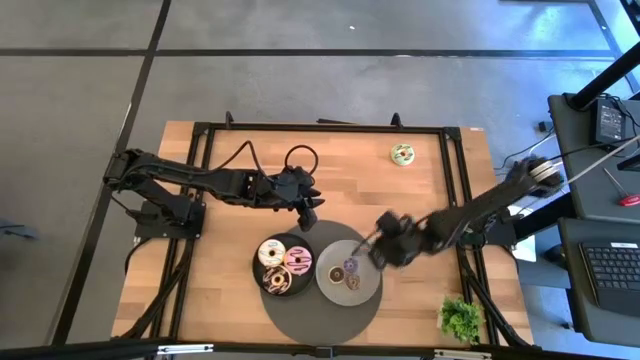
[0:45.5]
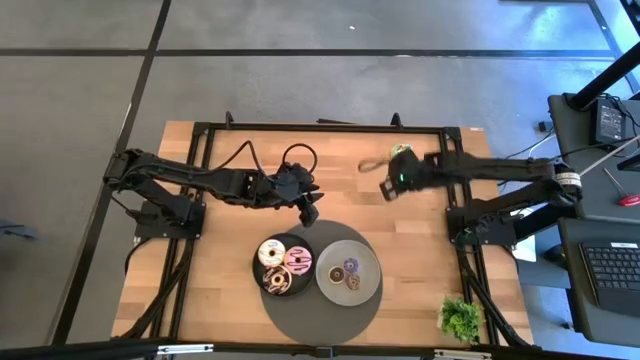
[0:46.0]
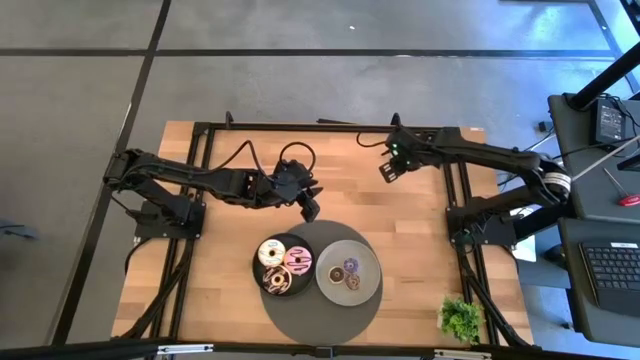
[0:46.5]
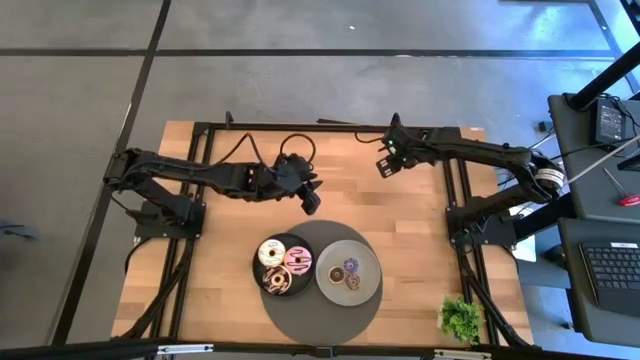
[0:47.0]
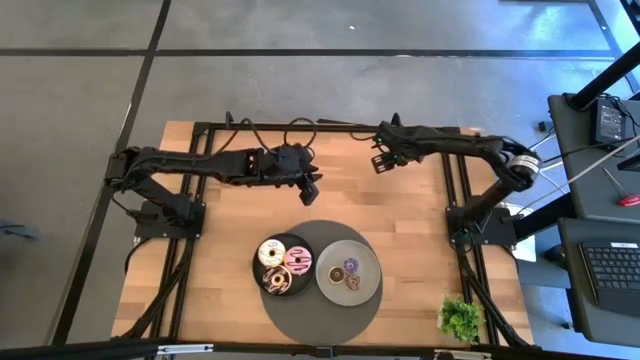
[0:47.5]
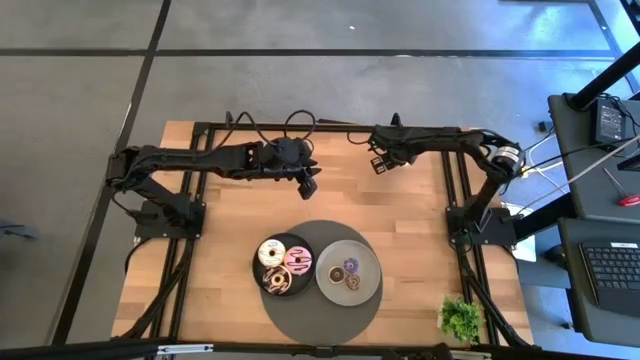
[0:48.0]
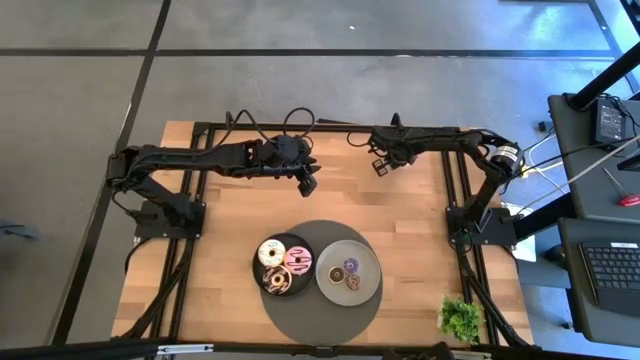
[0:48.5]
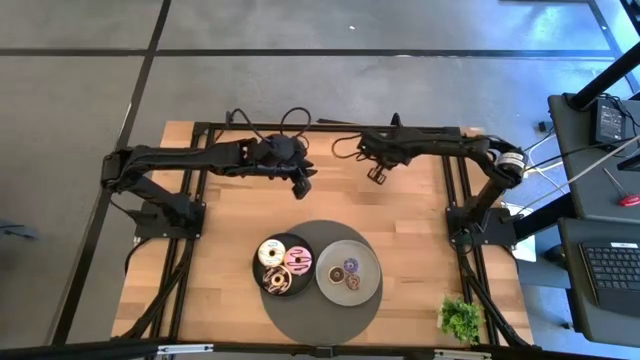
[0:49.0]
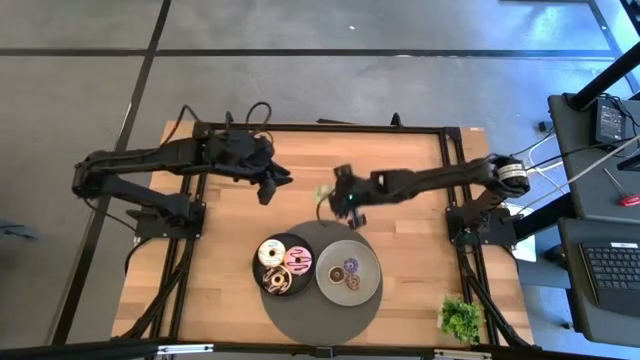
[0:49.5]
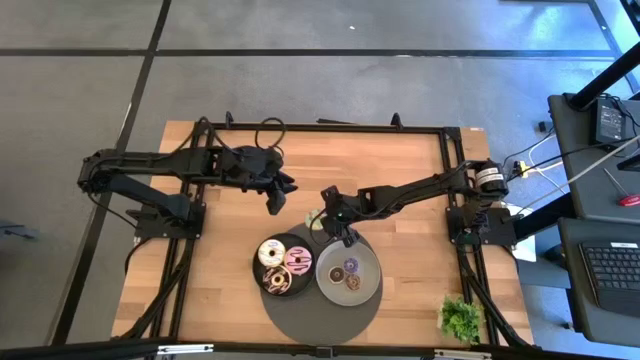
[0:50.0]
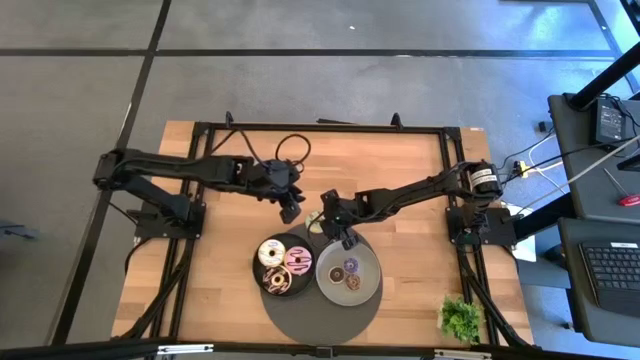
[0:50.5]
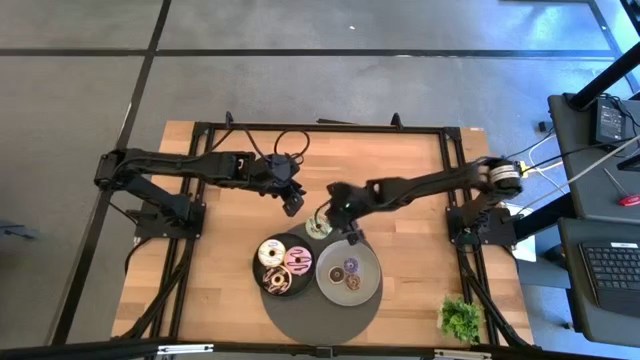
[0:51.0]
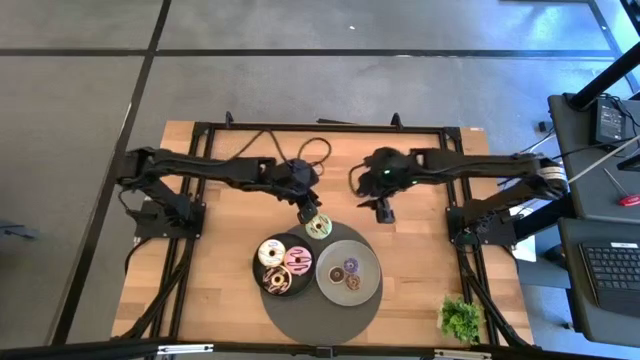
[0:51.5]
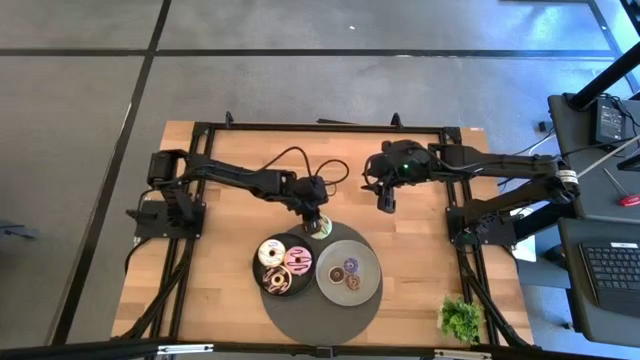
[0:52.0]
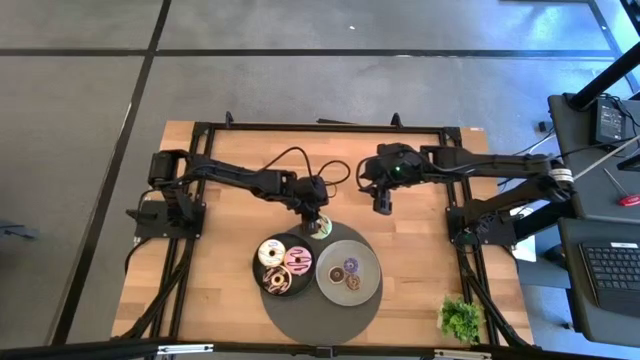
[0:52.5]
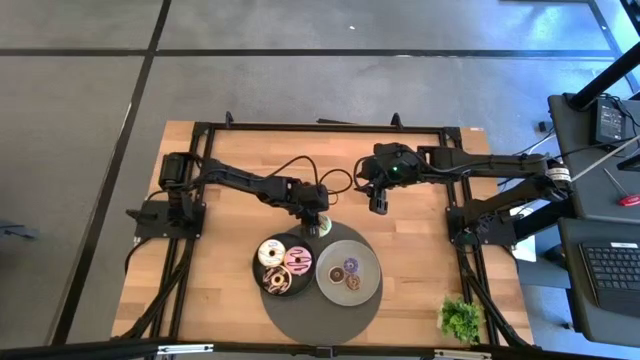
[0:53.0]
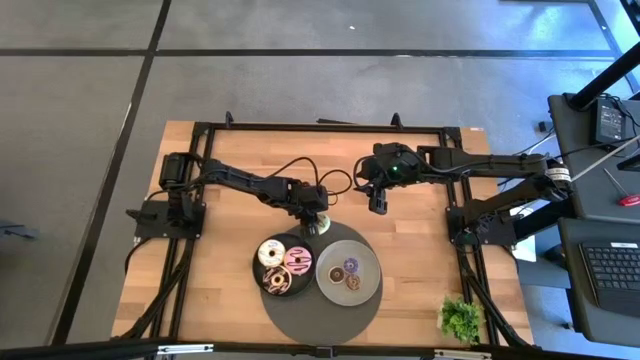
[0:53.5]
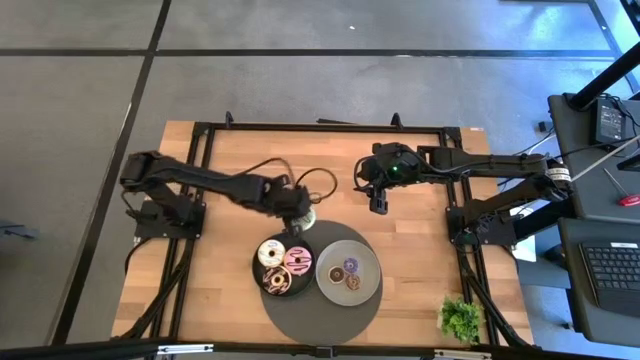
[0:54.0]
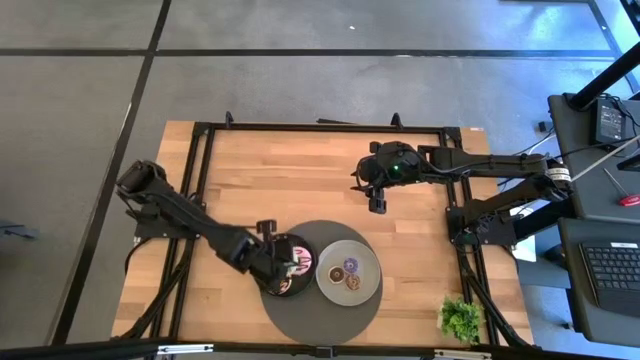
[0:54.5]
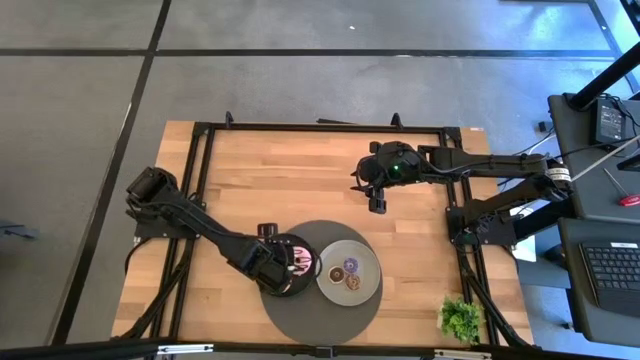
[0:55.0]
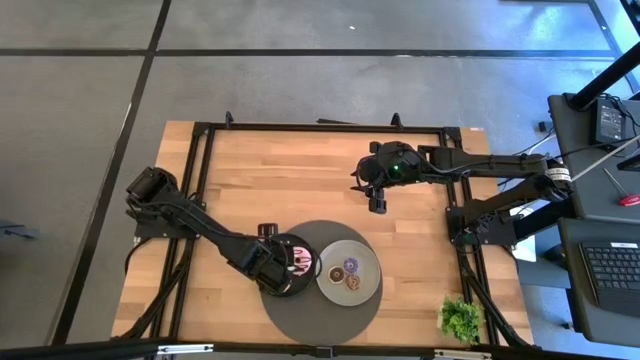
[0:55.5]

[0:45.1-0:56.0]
Task: Pick & Place donuts
Put the big light green donut on the black plate

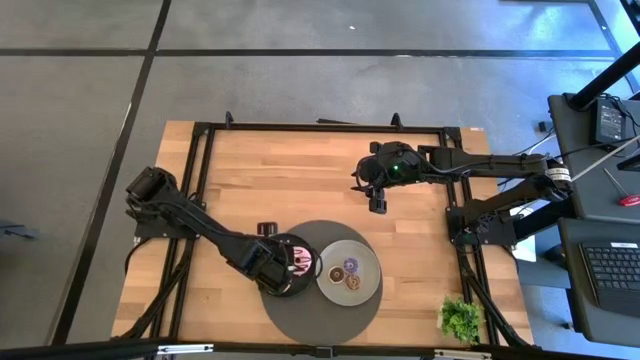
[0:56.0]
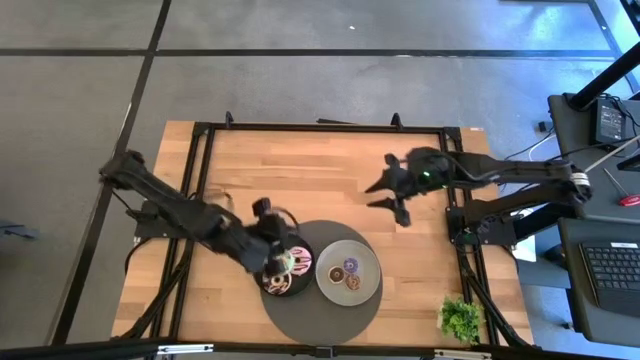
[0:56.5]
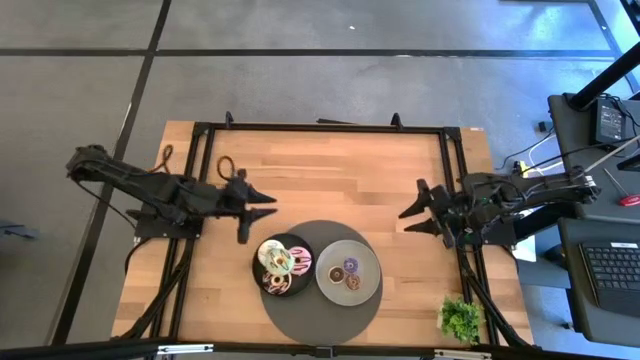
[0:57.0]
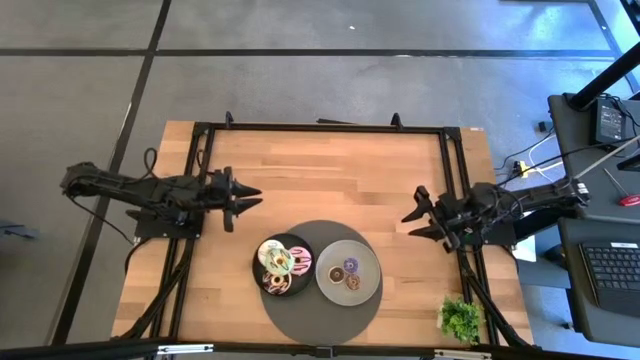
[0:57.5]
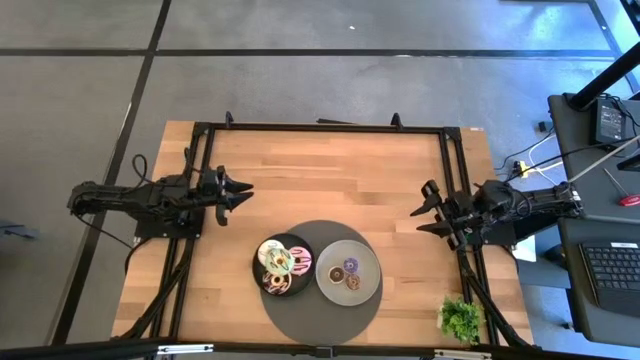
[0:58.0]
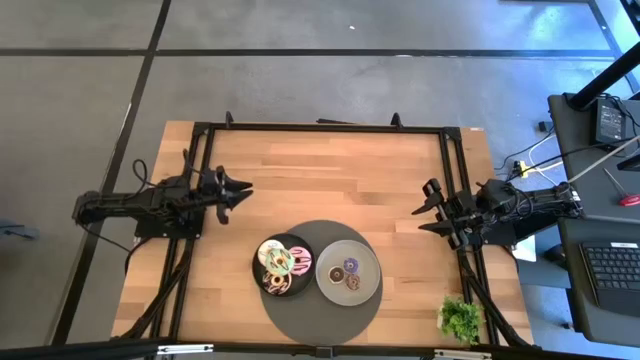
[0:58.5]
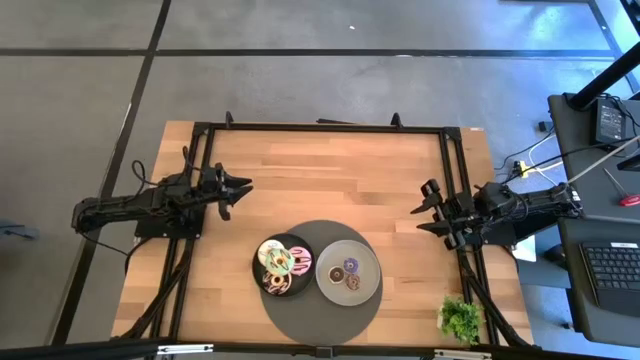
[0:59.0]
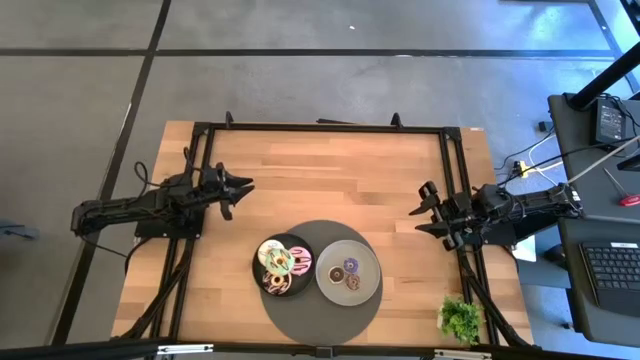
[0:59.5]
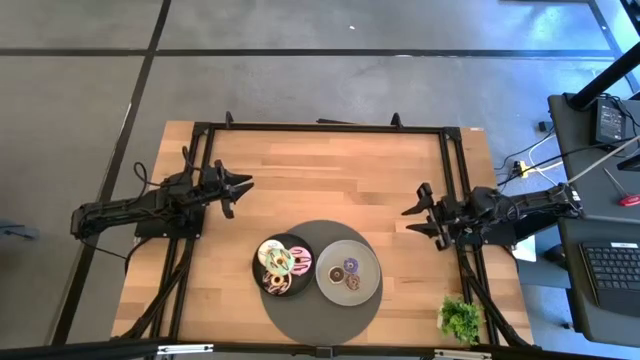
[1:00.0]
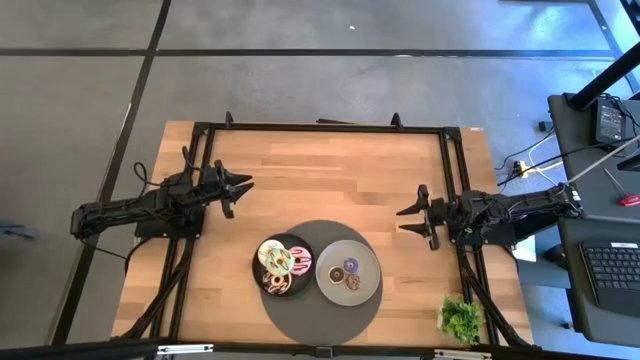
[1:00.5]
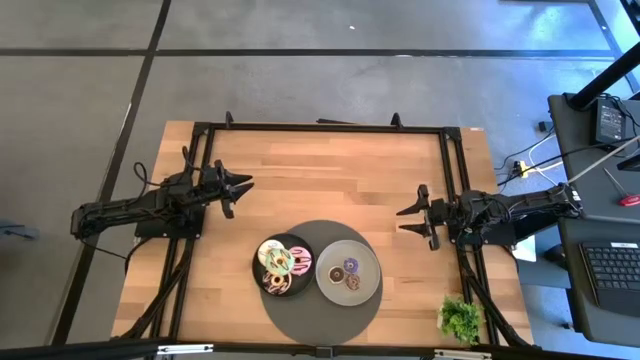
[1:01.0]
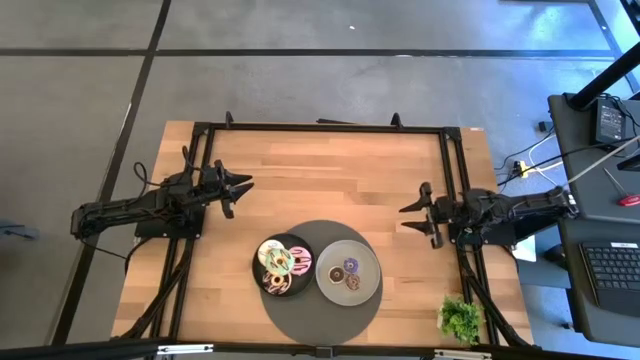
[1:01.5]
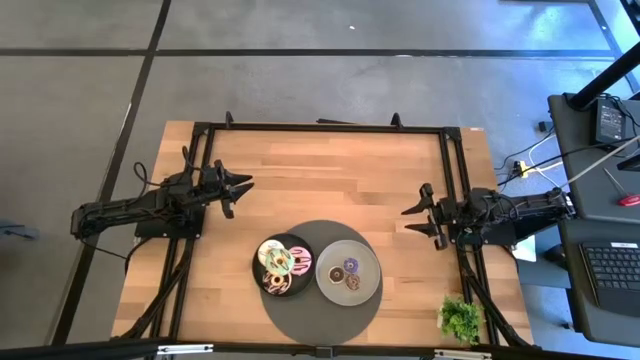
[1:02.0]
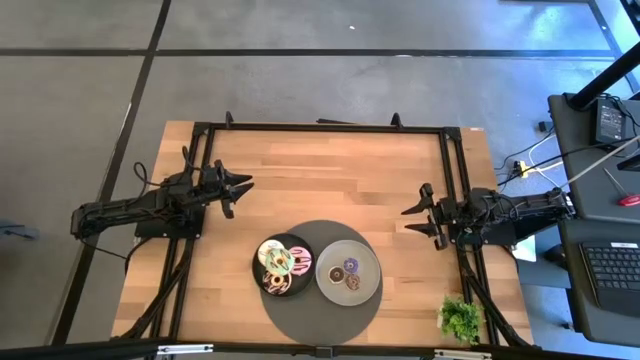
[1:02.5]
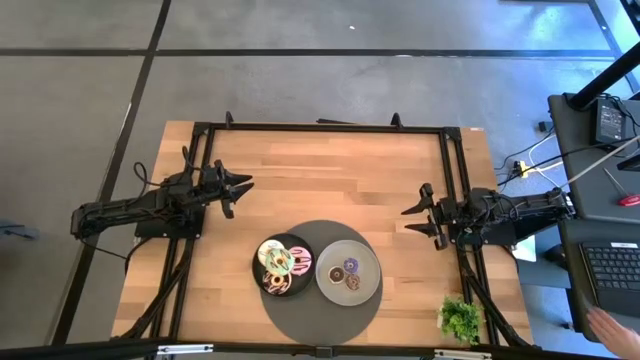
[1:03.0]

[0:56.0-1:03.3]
Return to Home Position

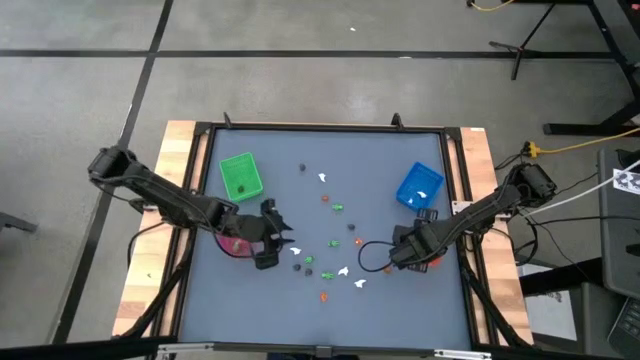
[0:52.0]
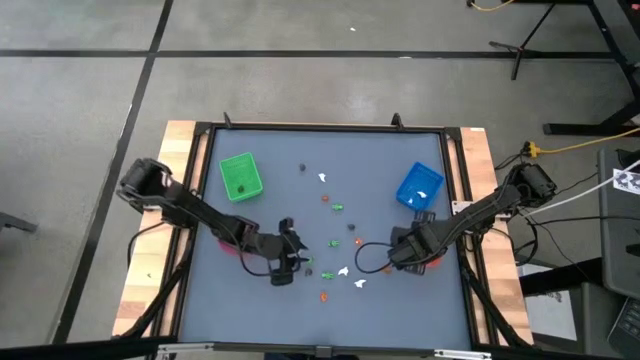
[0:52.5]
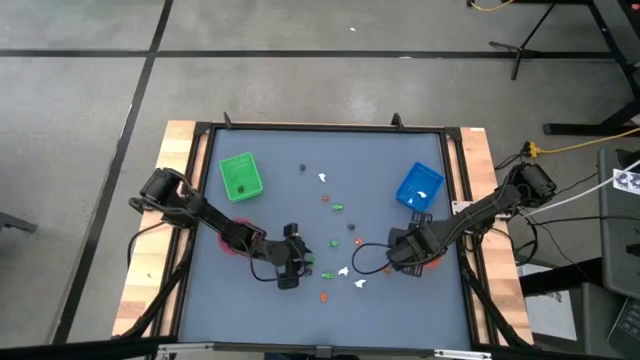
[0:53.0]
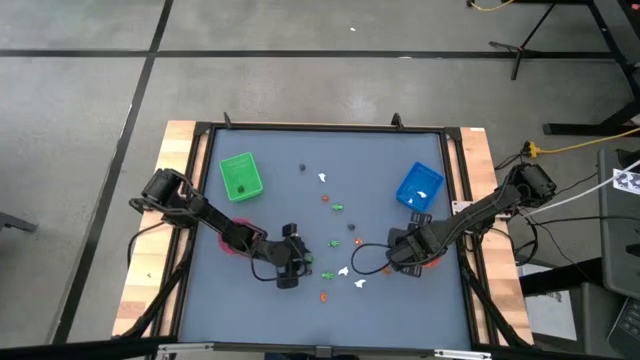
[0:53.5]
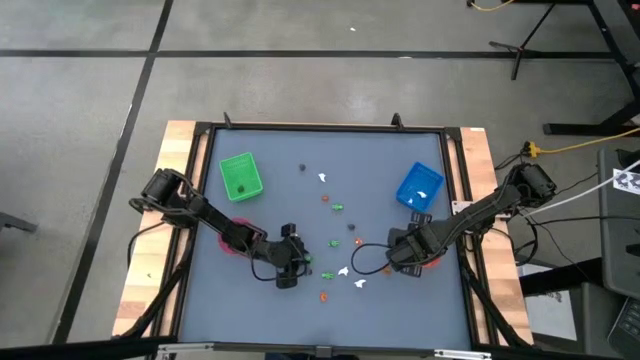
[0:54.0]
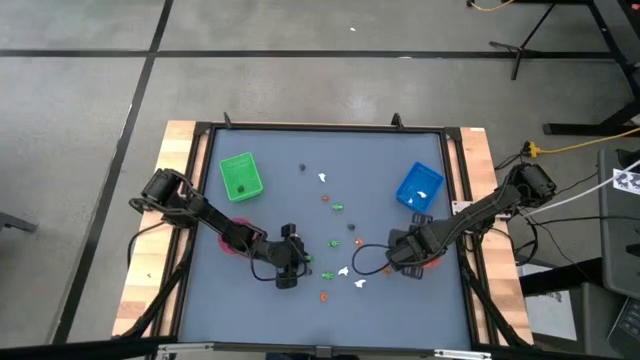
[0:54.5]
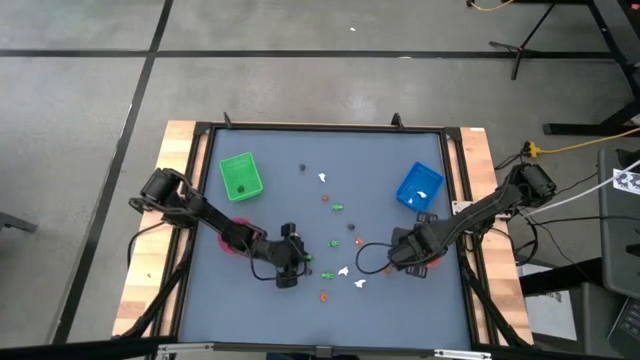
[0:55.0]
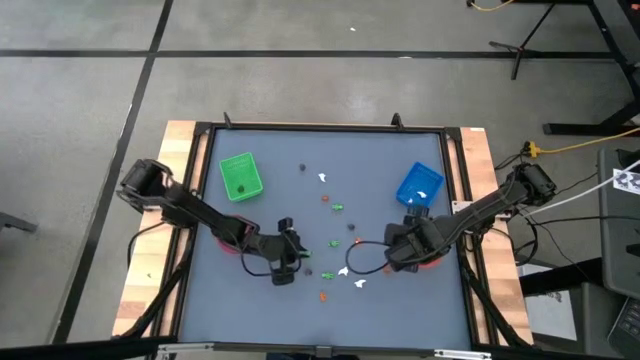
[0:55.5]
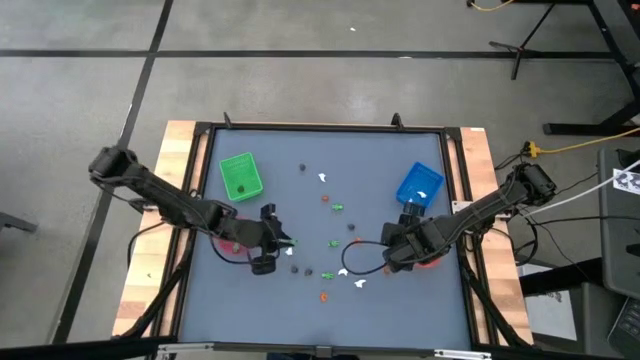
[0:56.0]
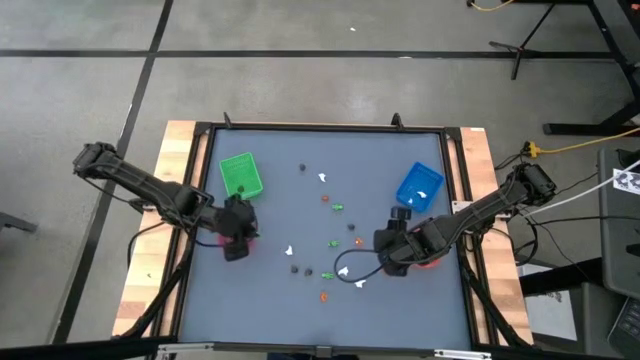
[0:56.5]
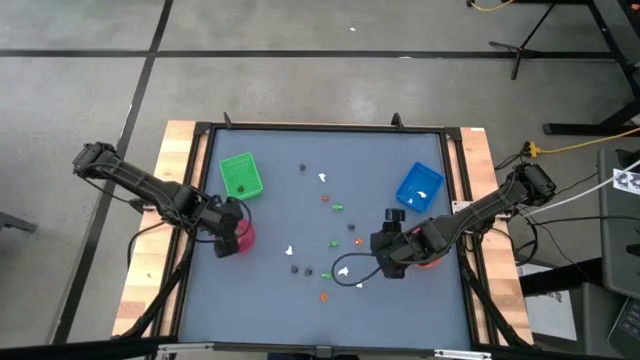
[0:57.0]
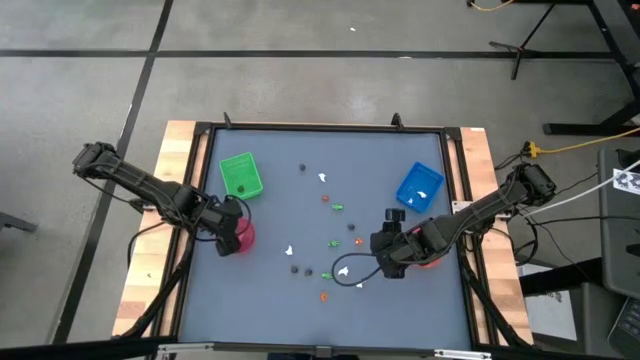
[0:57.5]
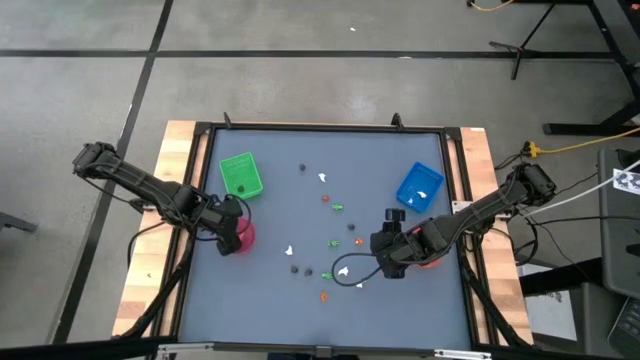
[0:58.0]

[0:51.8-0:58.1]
Task: Sort Halloween decoration
Put the small green skeleton toy into the transparent red bowl
